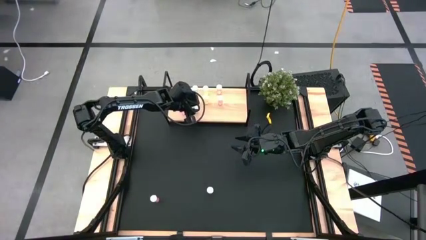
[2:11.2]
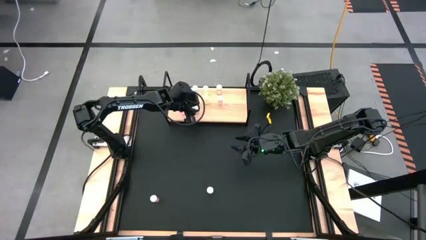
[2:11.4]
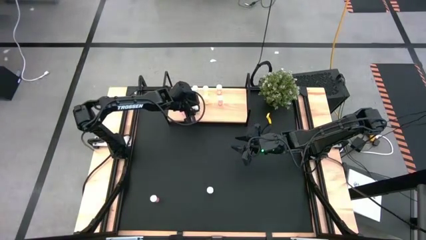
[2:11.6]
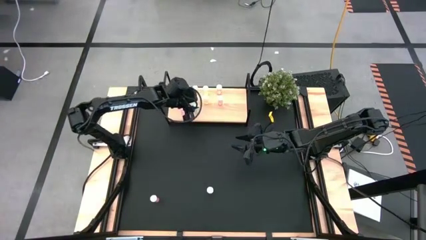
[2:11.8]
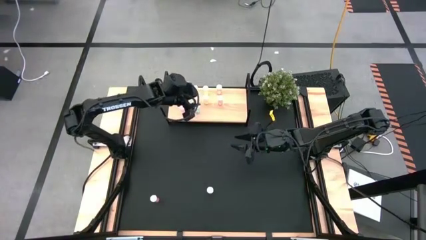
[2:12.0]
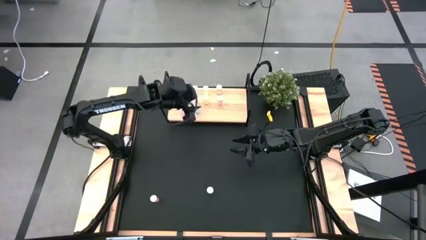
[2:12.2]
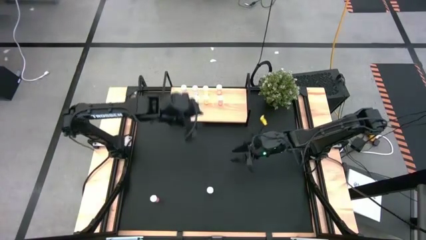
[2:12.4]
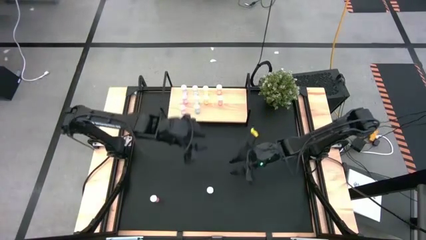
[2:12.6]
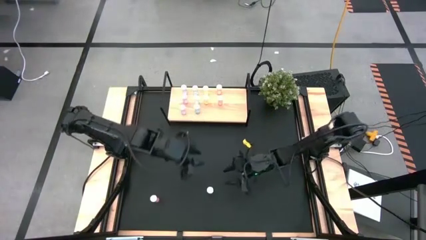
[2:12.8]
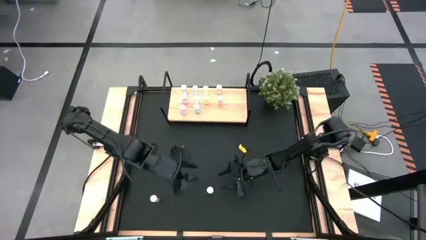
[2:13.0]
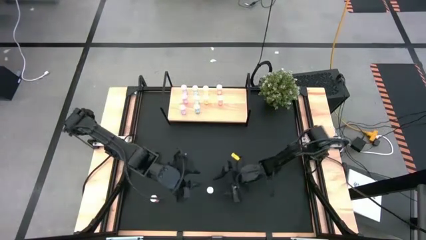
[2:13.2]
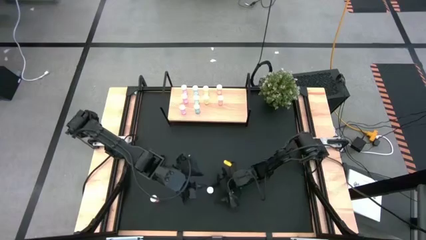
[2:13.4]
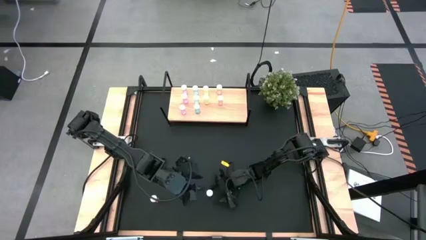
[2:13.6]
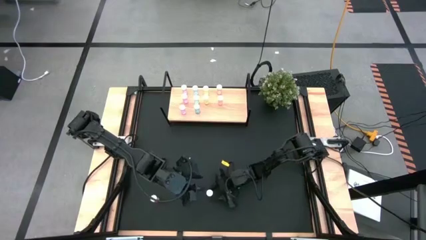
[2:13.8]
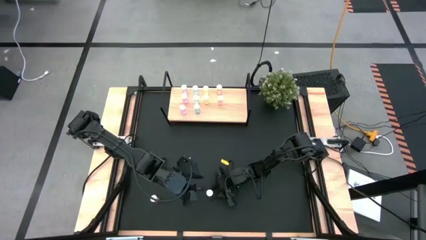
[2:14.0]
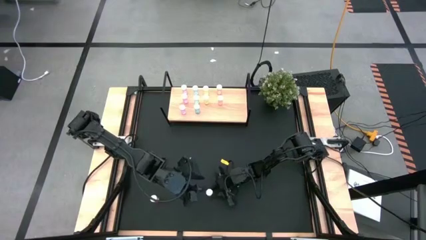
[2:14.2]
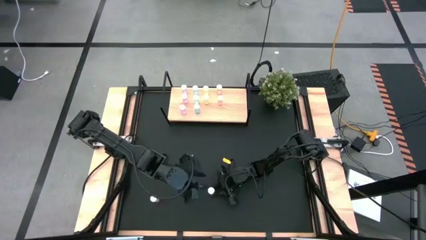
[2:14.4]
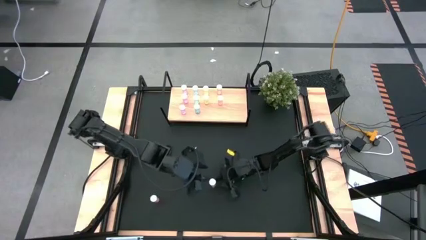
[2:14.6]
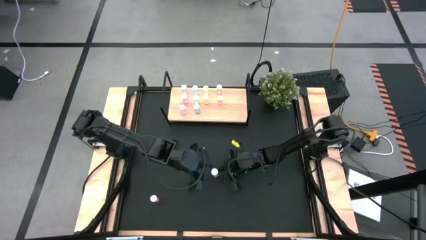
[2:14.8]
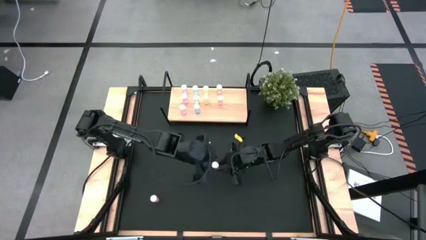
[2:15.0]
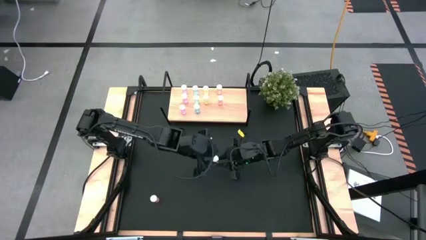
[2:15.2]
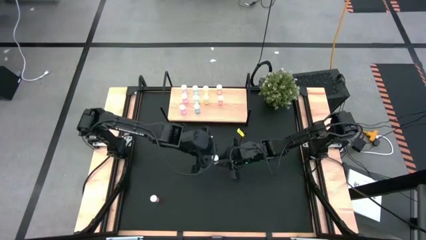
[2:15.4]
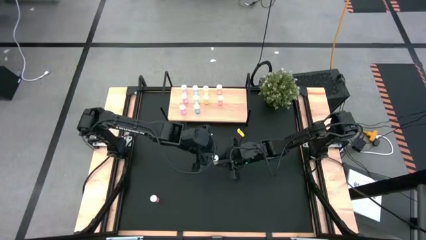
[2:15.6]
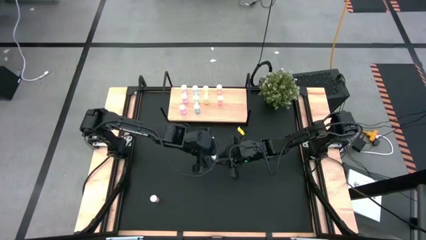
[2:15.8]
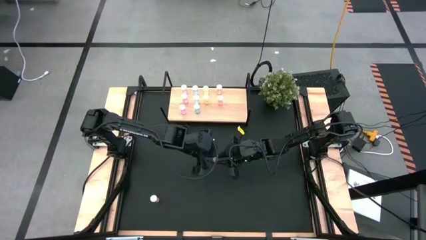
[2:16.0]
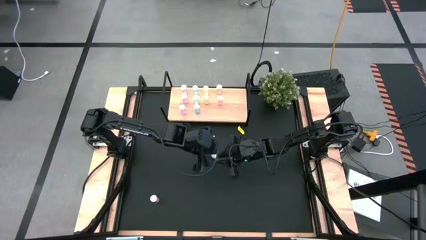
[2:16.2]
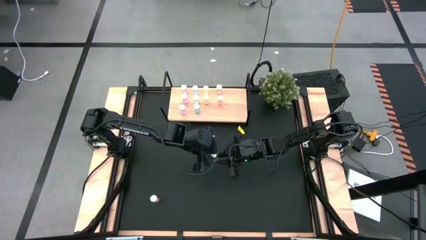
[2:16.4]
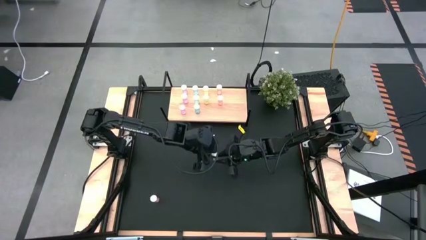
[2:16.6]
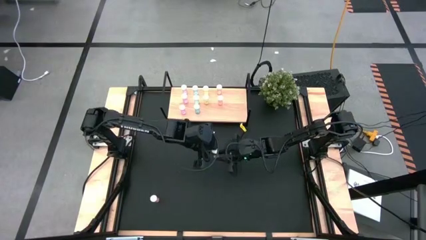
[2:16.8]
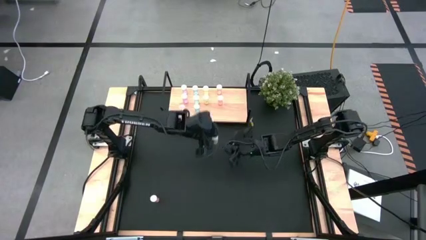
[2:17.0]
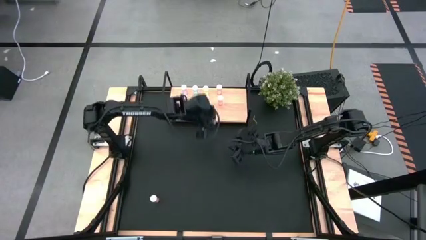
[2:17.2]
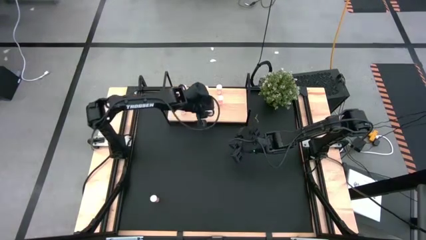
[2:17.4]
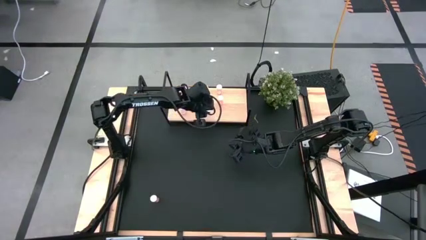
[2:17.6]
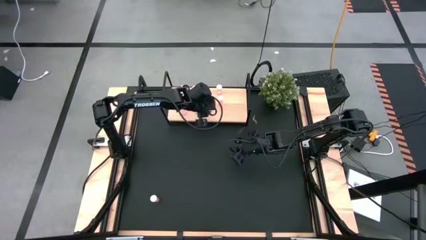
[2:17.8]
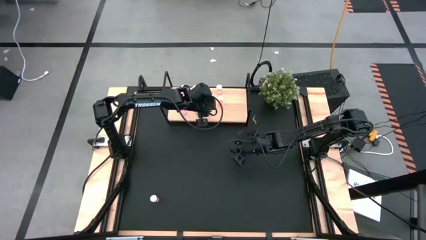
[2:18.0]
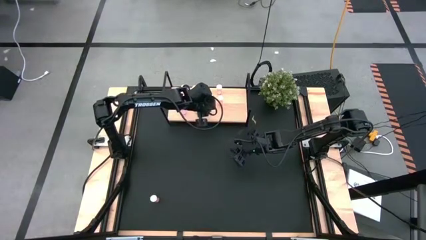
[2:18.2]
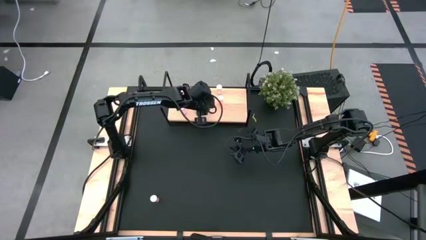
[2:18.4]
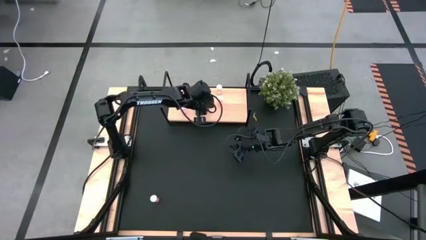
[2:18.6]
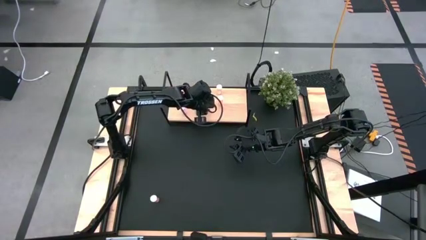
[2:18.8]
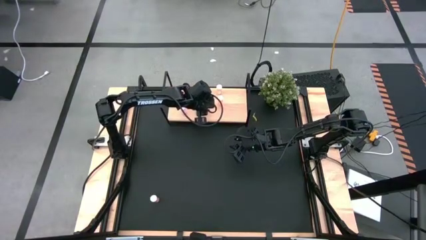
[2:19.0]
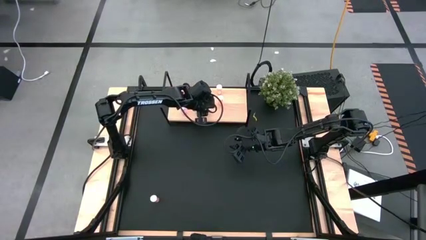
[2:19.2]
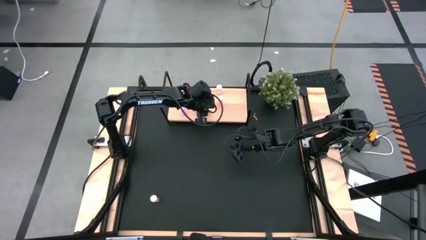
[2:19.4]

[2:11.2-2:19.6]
Task: Pick and place medicine bottles onto shelf by color
Put the yellow medicine bottle on the shelf aligned with the other yellow medicine bottle

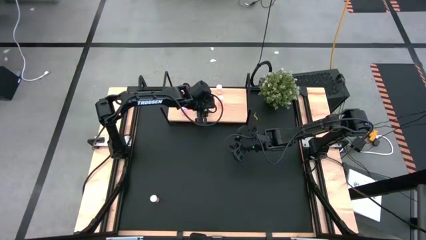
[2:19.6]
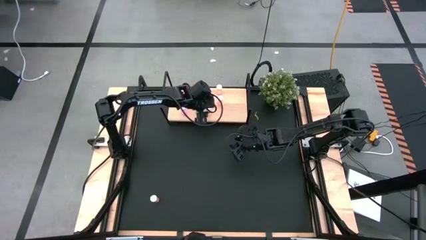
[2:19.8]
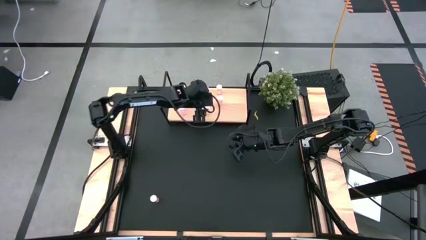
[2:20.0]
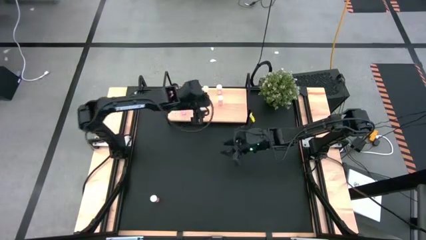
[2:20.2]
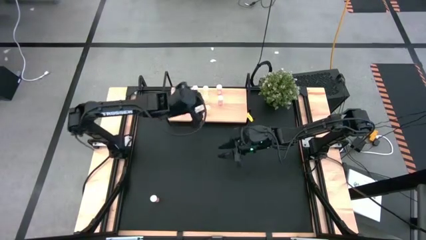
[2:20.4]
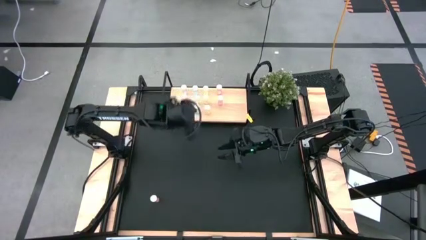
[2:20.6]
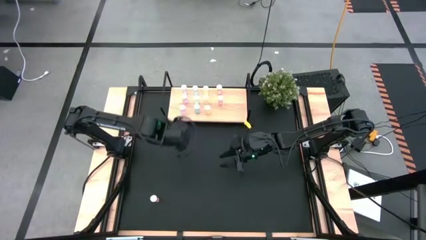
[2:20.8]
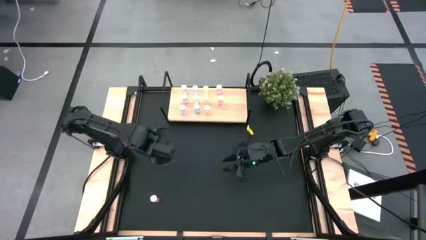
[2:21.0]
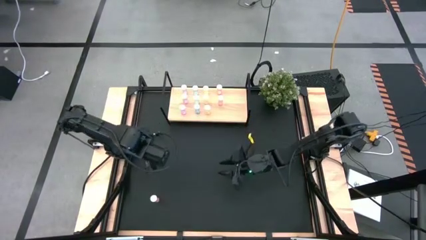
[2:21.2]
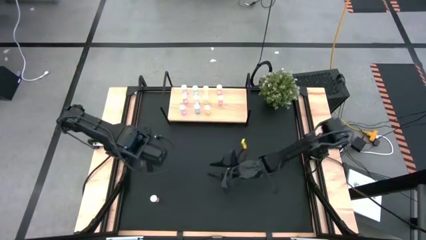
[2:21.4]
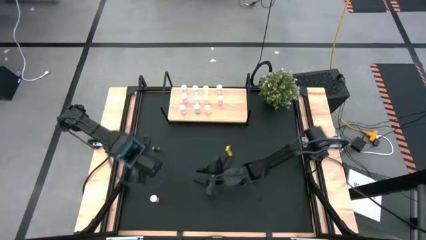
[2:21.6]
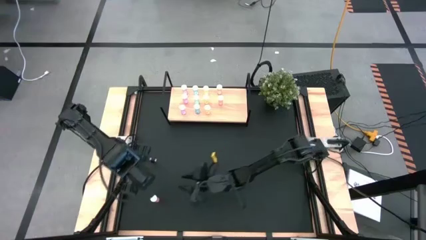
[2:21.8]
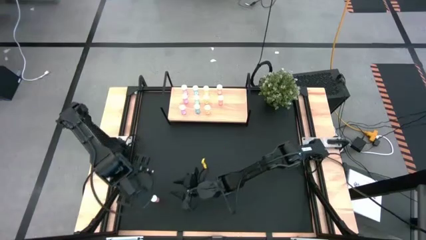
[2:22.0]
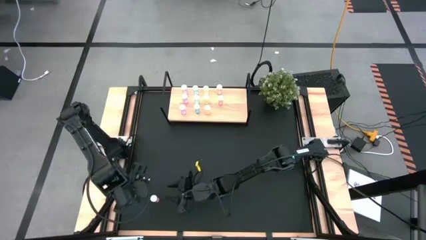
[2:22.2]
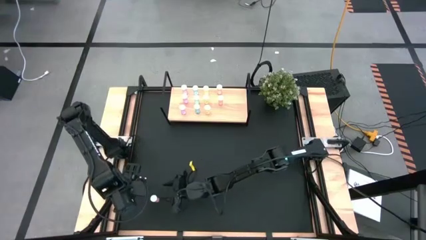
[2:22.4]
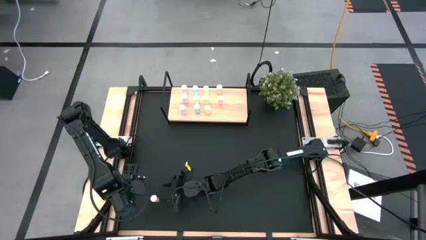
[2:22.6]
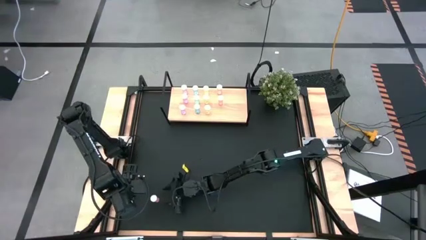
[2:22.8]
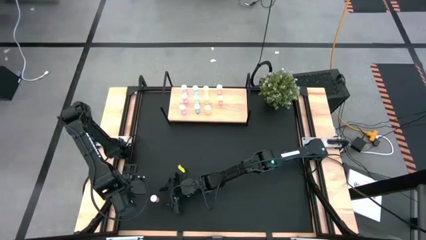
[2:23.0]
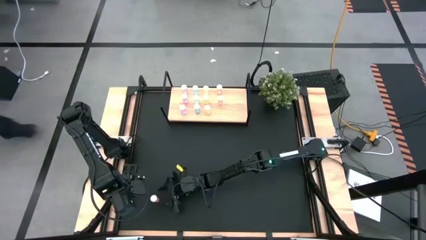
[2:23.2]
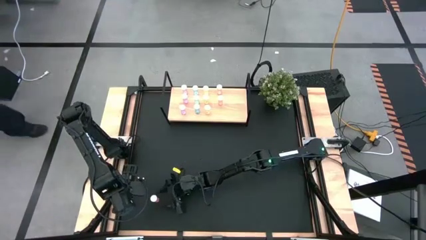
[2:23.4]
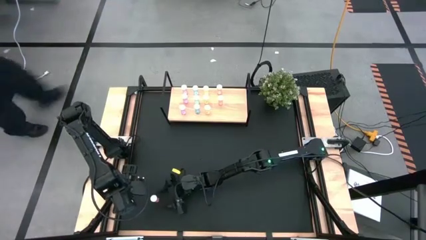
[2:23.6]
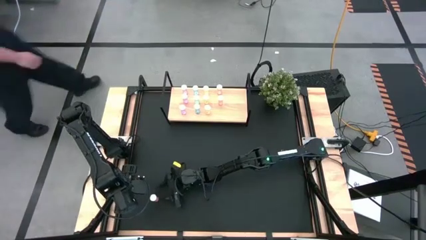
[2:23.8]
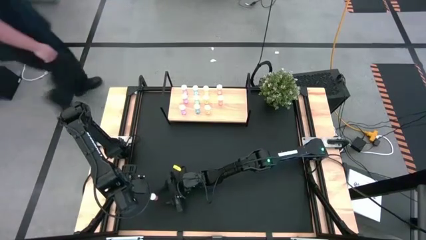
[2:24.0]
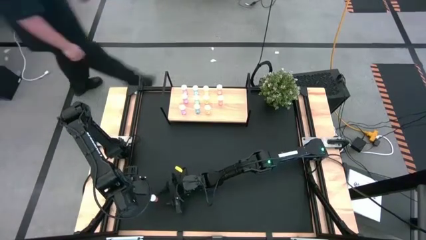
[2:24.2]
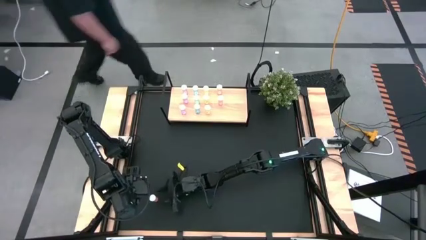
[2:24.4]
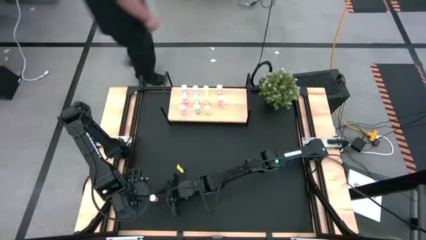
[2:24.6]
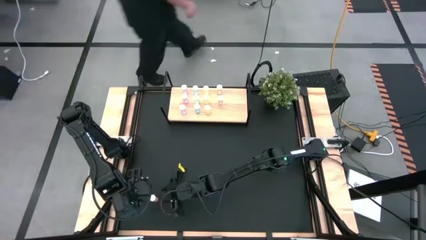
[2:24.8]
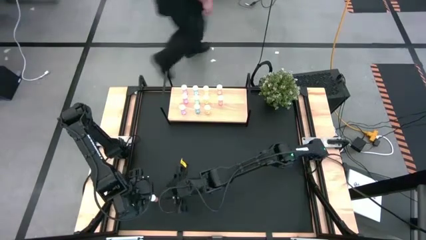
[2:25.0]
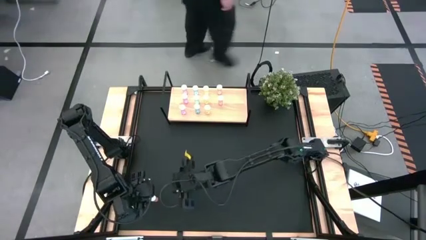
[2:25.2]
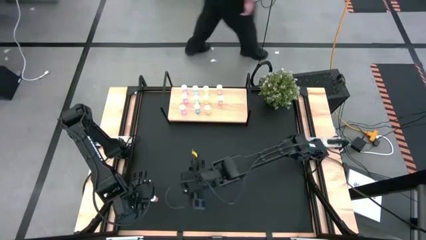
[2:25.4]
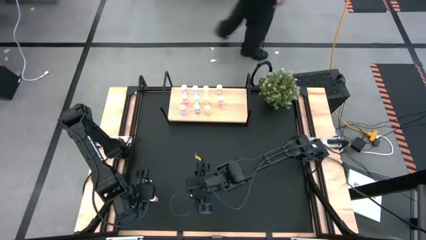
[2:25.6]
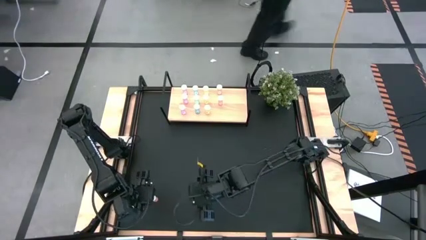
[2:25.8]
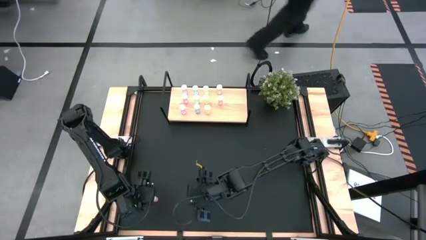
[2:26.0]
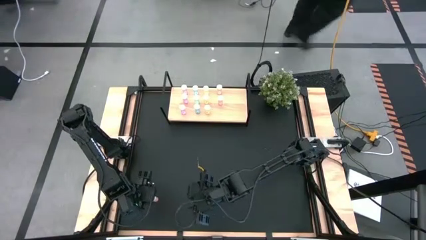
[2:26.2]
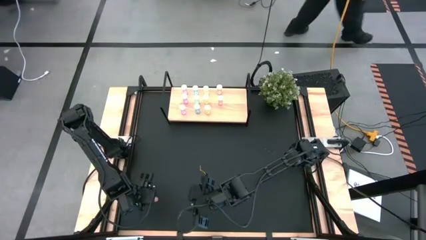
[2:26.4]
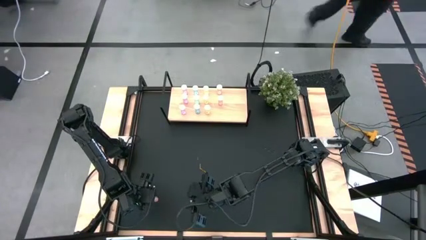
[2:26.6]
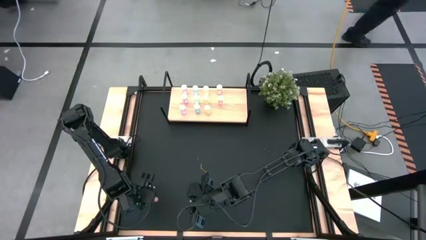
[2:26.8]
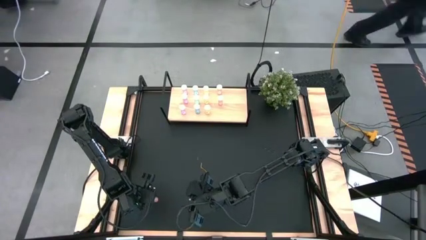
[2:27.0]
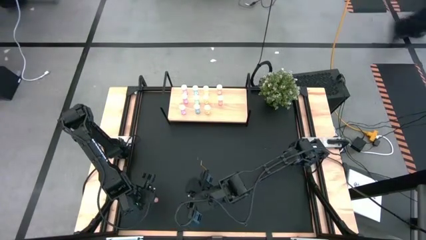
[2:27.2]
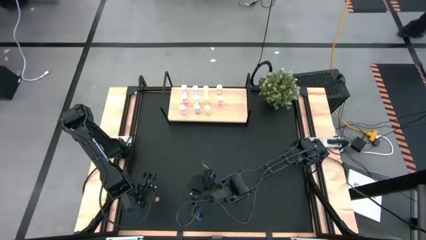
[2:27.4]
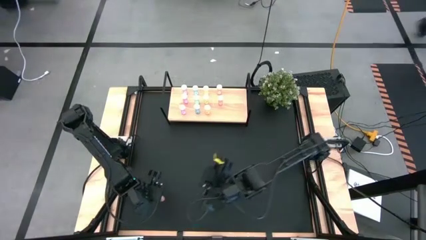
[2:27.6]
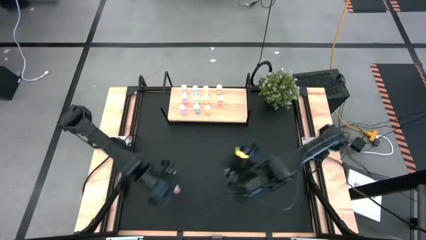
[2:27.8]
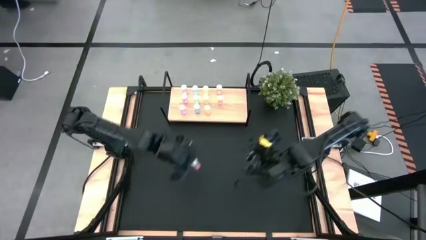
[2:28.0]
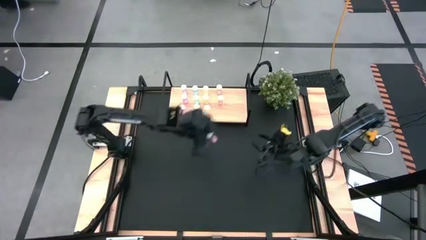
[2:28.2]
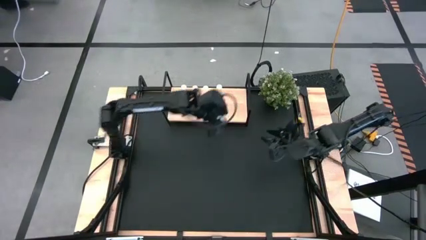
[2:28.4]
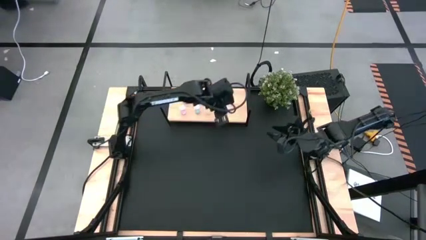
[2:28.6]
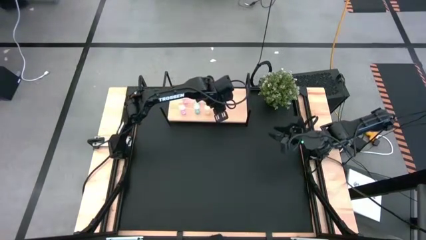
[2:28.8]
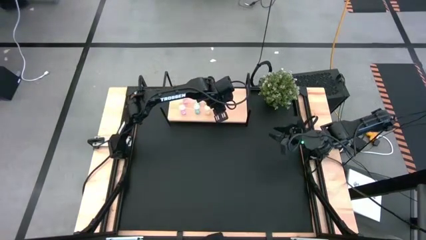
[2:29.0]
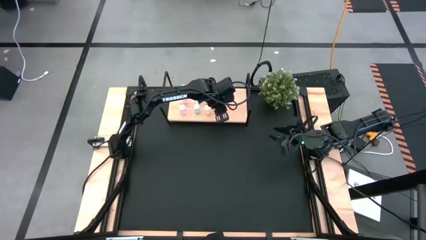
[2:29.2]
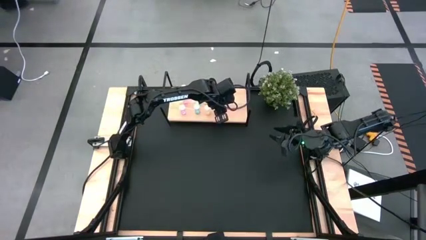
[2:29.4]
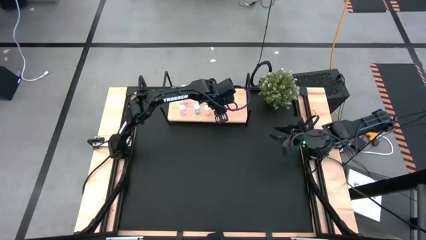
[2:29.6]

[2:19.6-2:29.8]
Put the red medicine bottle on the shelf aligned with the other red medicine bottle
